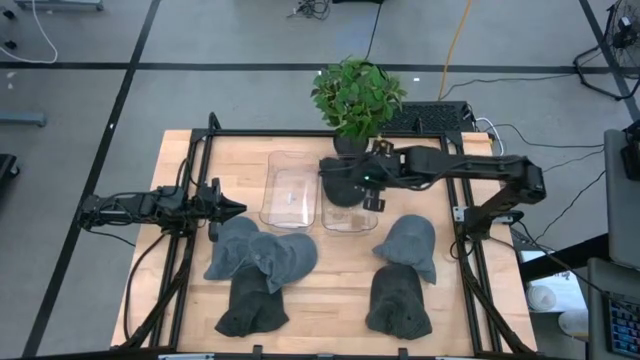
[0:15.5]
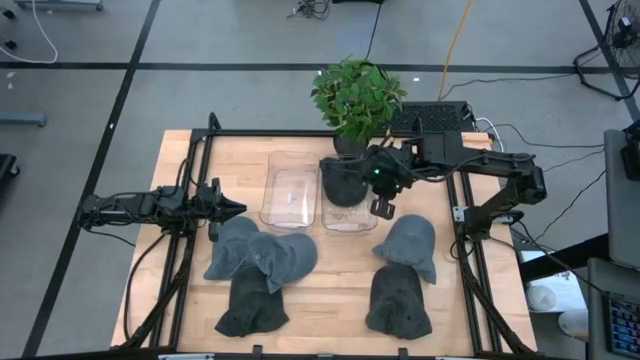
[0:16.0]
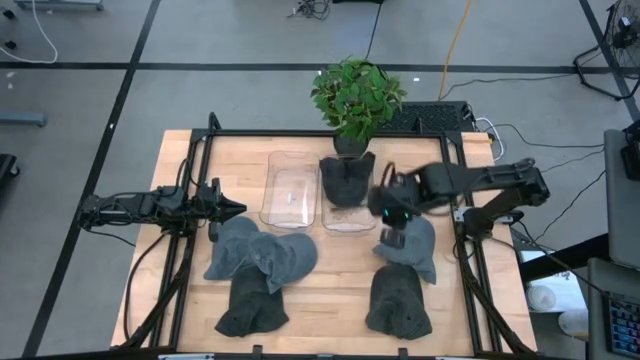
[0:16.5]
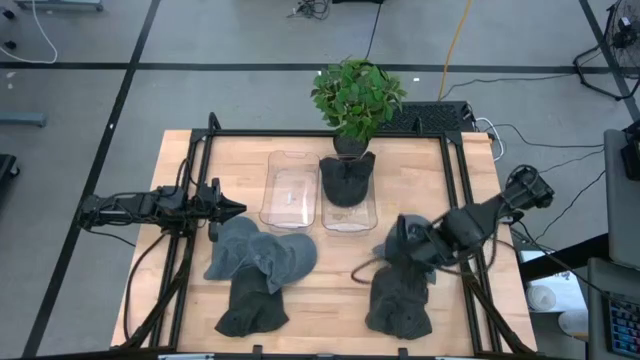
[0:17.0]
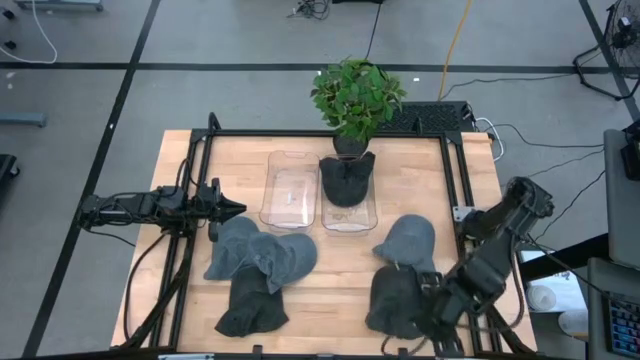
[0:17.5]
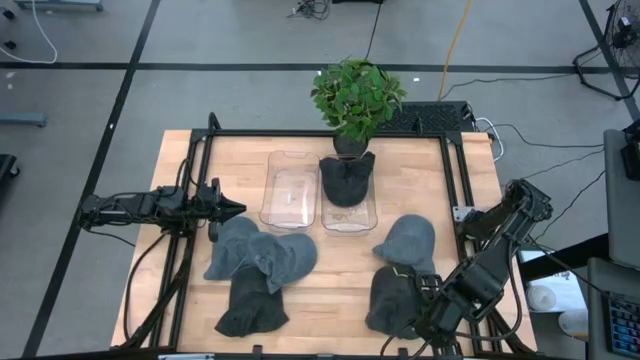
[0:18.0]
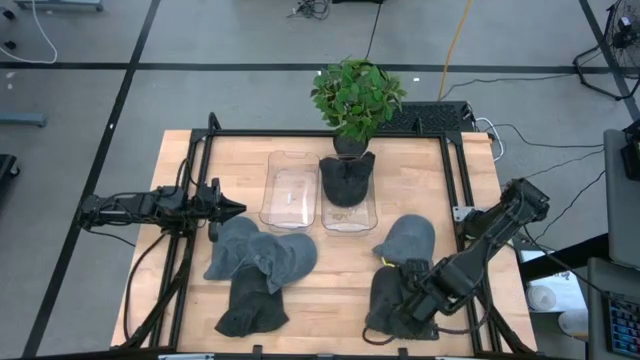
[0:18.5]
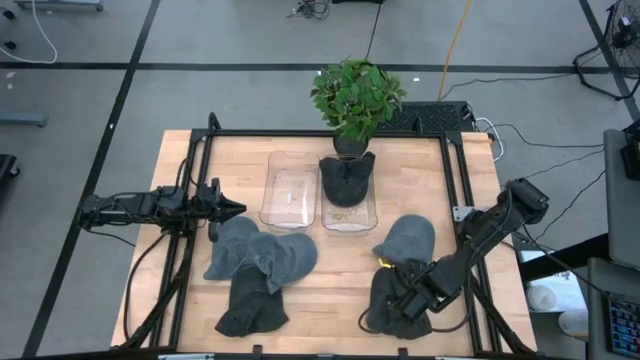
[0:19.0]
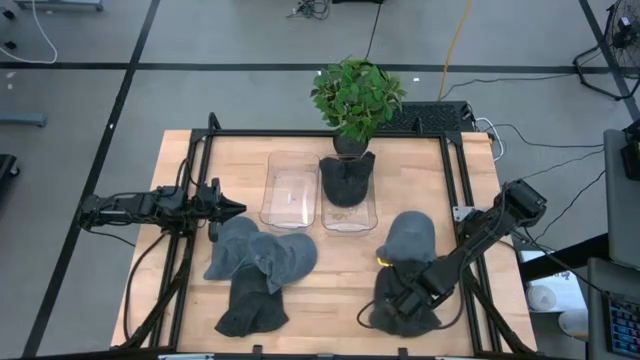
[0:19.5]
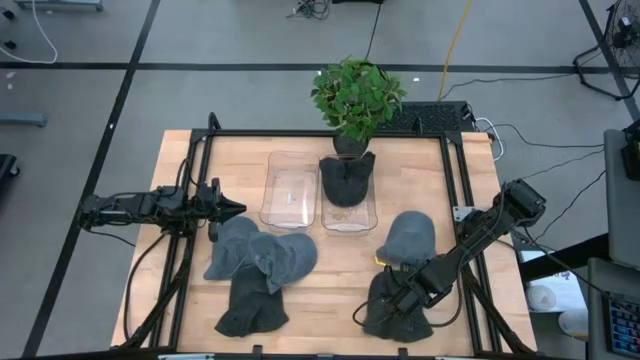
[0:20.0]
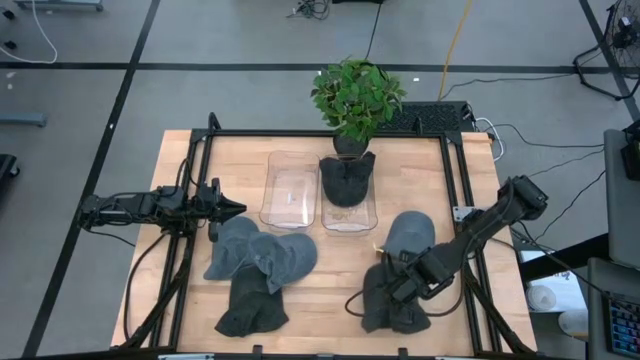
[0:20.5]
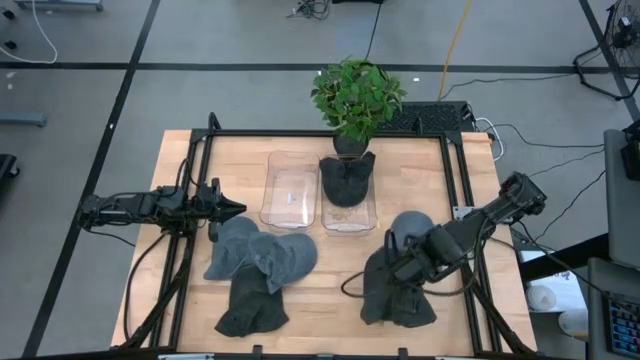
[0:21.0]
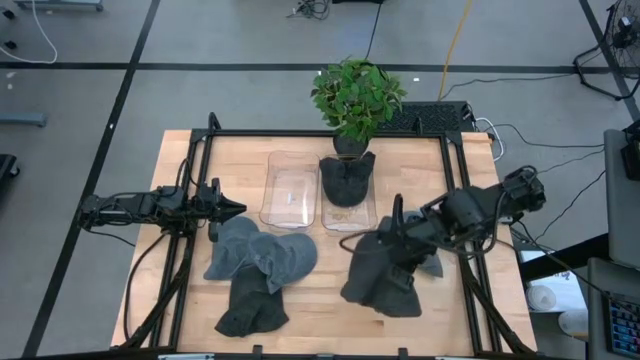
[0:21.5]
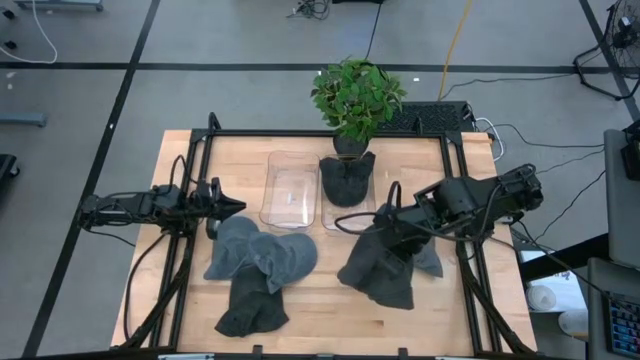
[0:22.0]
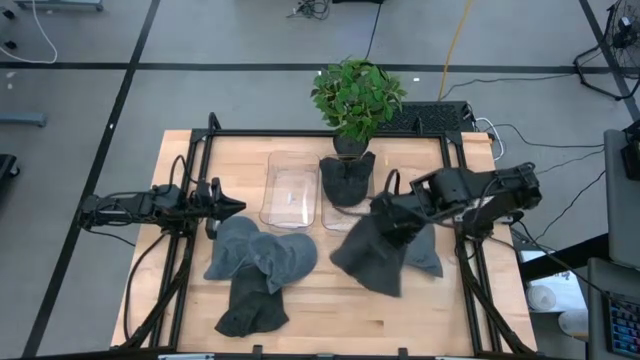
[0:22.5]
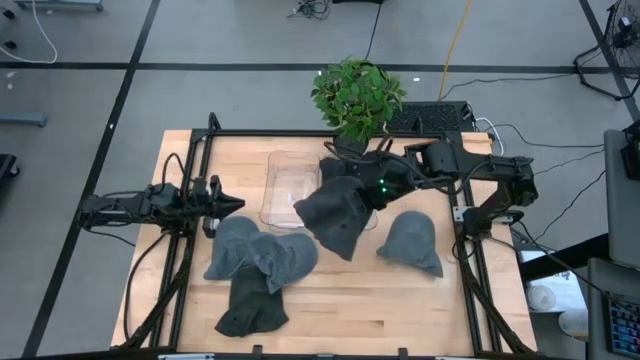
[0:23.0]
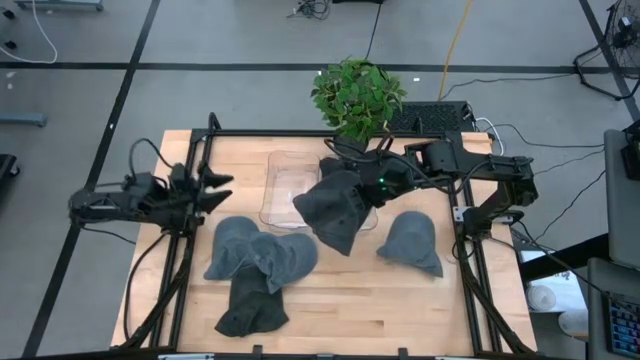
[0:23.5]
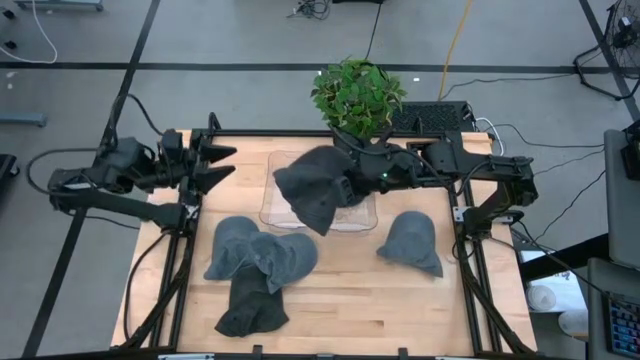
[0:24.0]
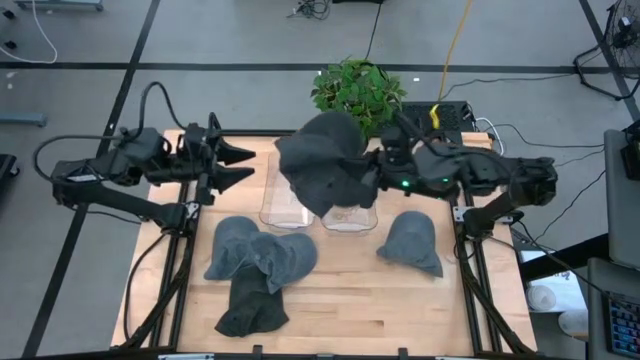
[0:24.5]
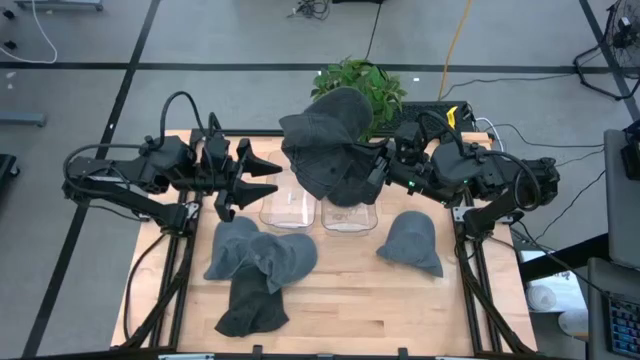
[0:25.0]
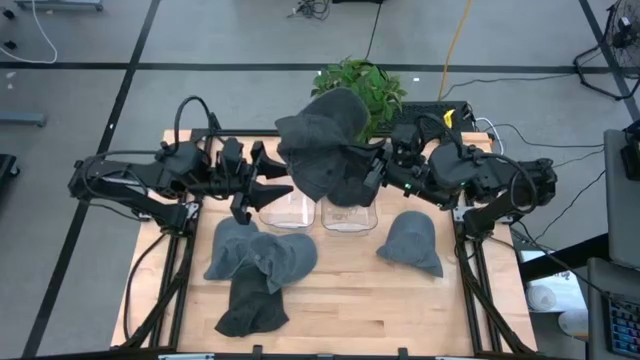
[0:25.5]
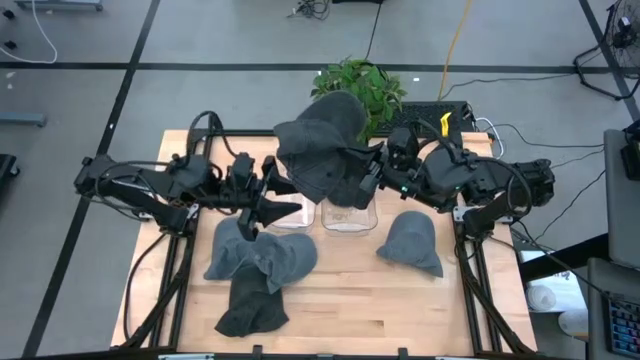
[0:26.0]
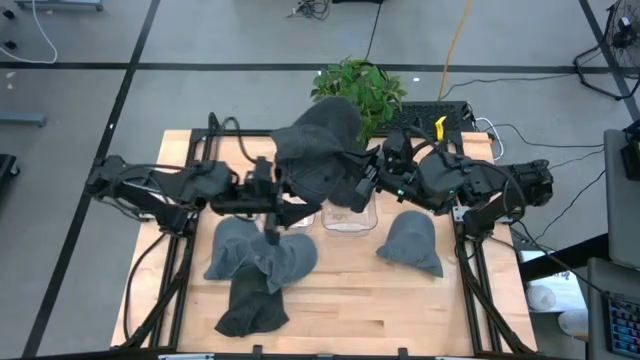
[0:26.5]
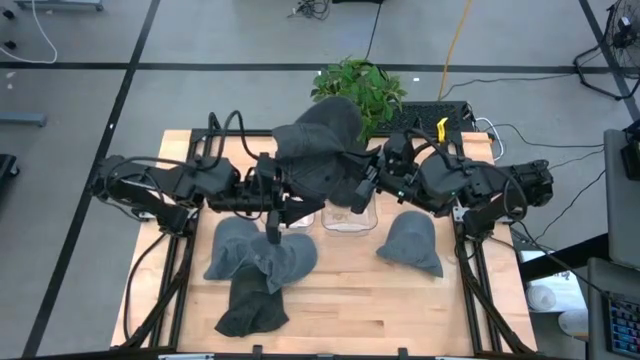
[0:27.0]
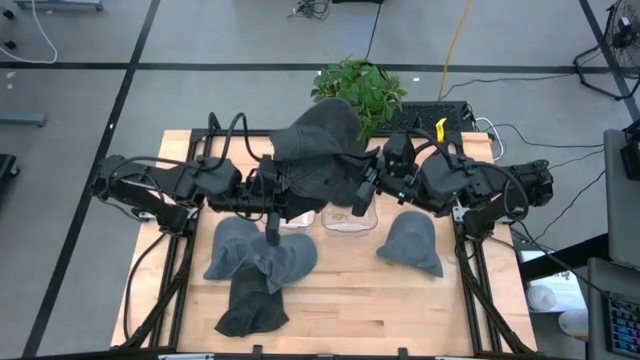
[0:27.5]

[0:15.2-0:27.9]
Task: Pick & Place hat
Put the right black cap into the right transparent bin

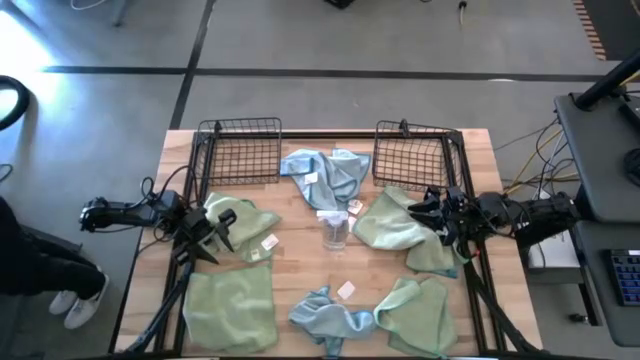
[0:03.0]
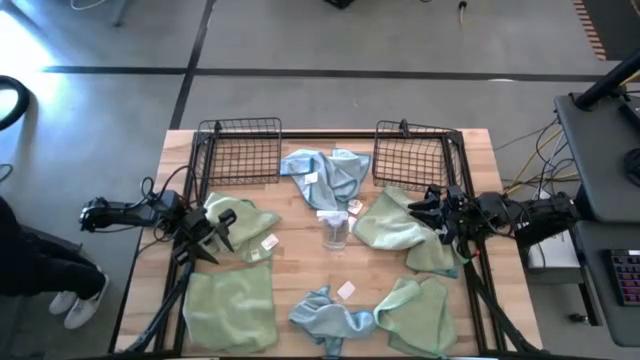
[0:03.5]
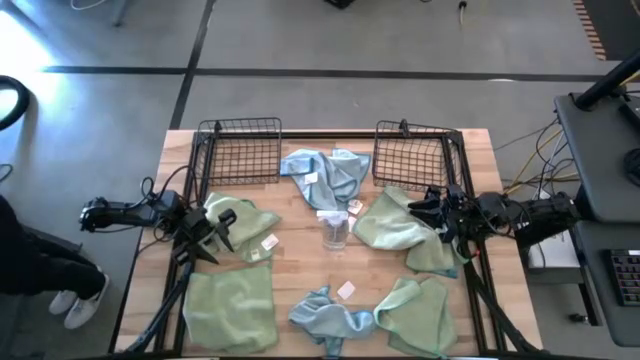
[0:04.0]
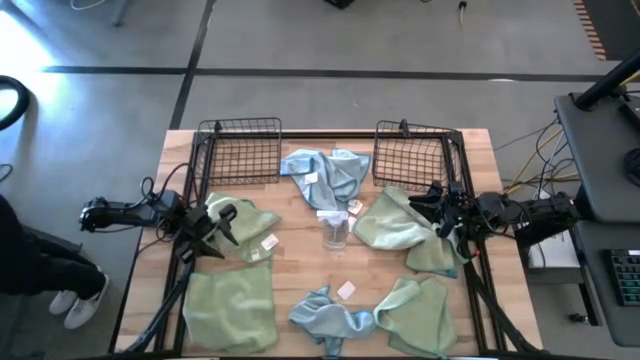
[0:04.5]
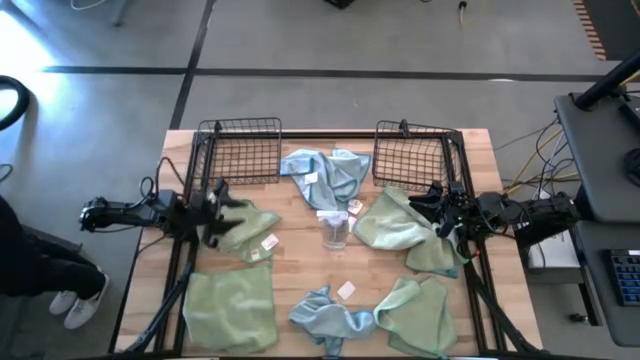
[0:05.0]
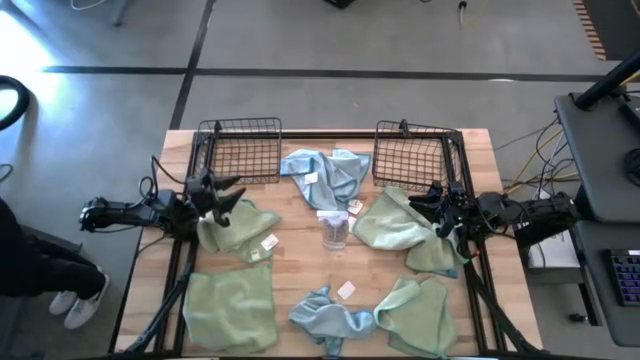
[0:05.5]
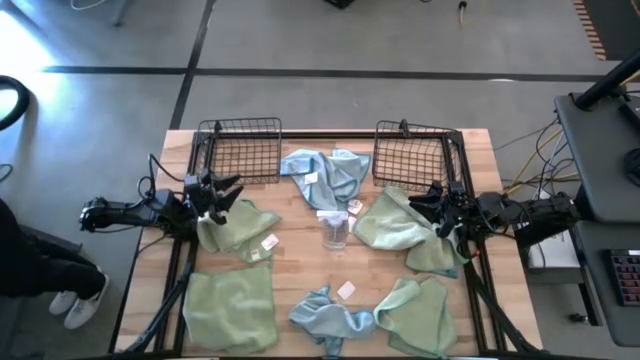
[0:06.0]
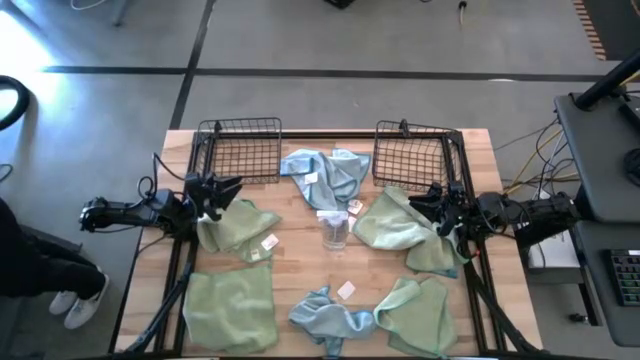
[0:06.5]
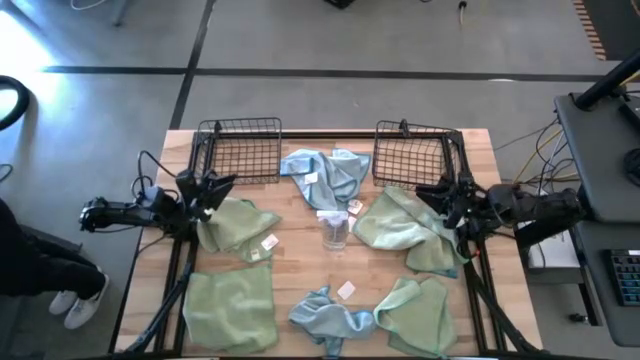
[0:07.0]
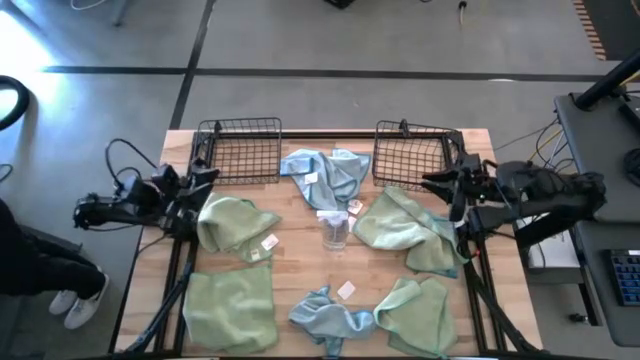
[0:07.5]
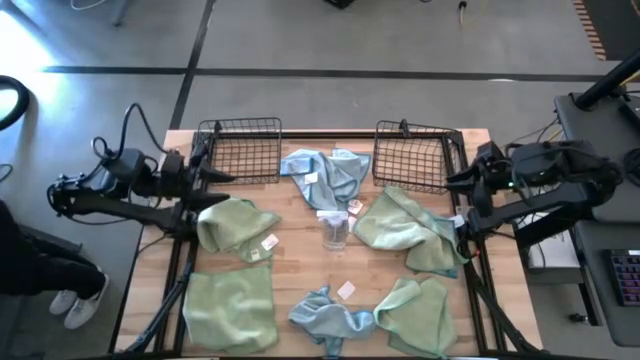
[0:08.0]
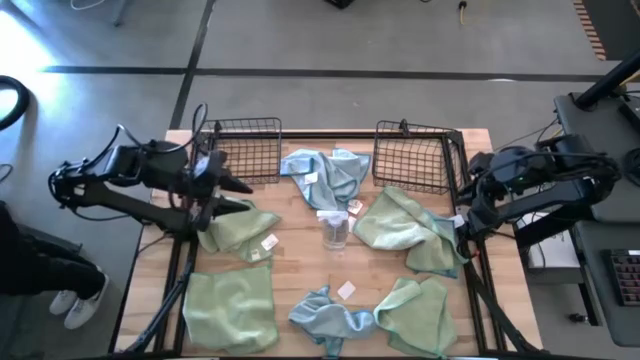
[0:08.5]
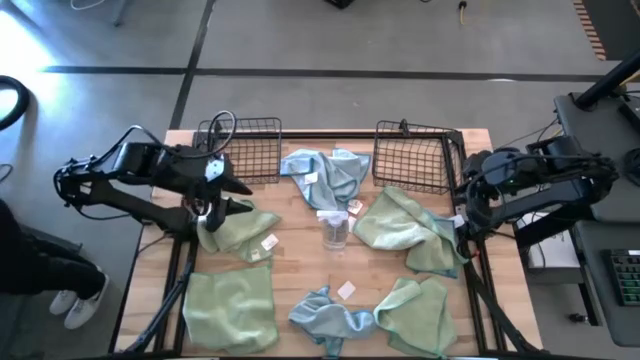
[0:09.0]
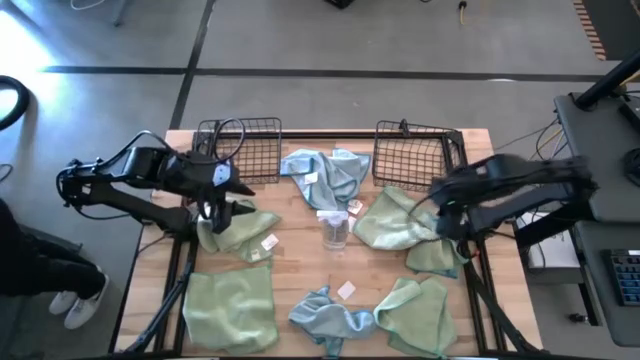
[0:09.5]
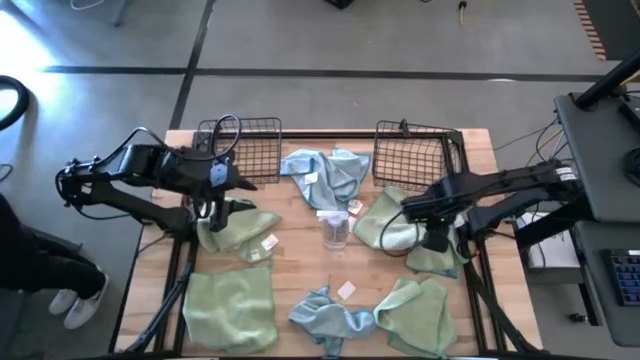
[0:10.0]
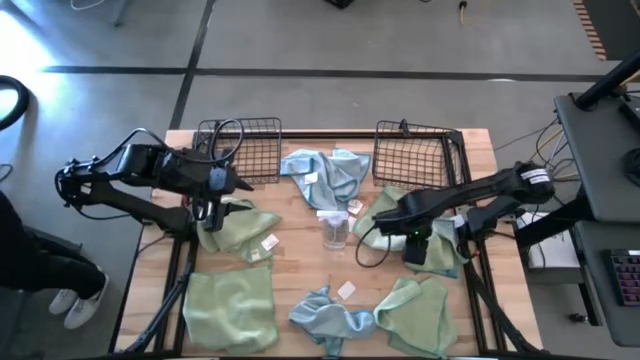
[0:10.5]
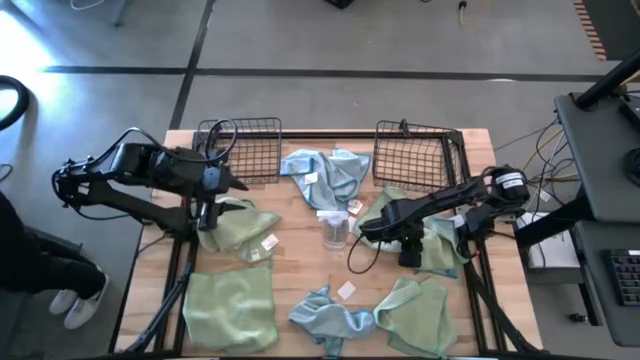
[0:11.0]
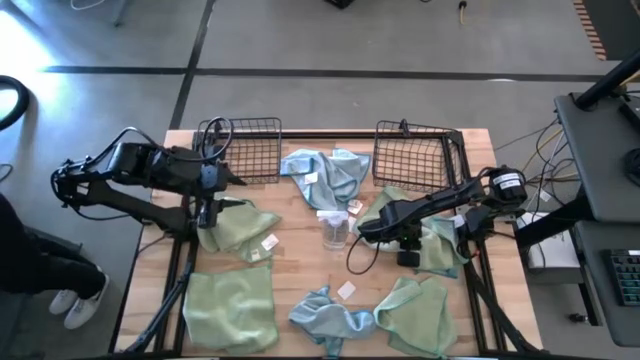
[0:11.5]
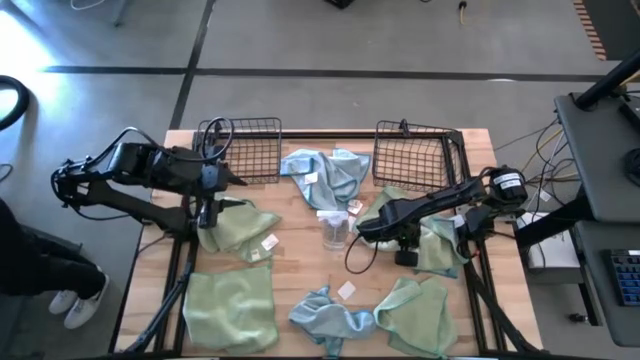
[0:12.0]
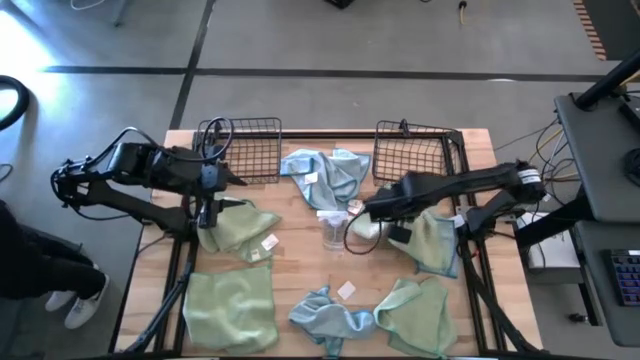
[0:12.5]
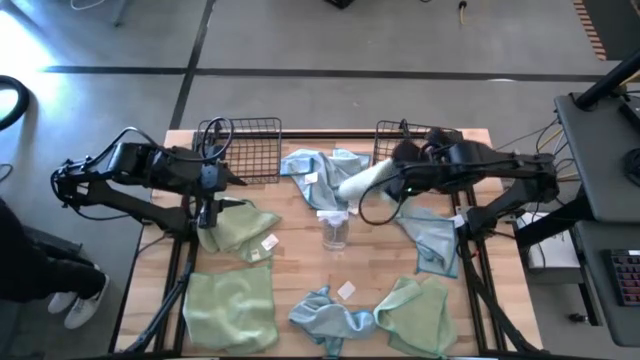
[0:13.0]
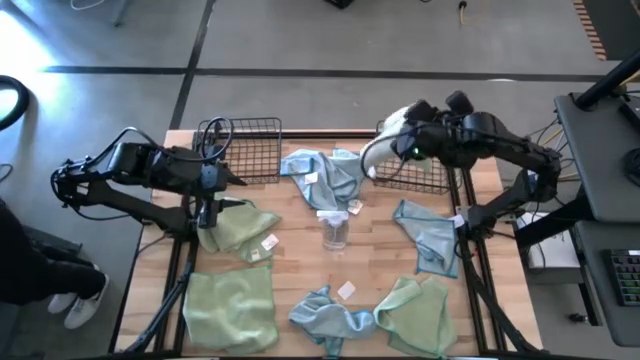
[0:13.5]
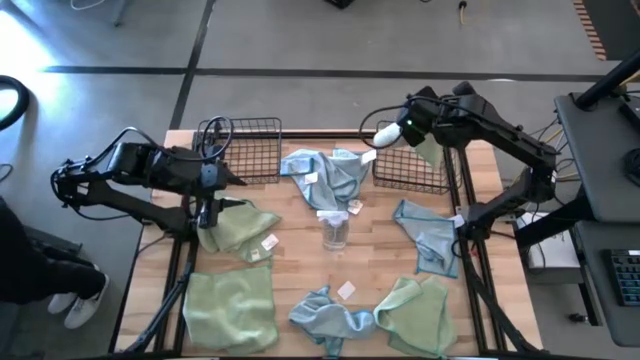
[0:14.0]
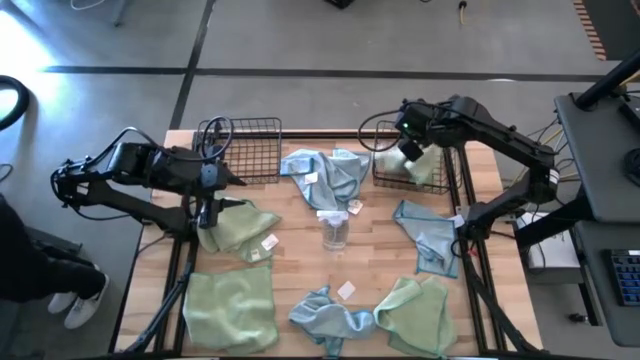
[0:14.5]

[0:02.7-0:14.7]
Task: Sort microfiber towel by color & place in baskets
Put the green towel into the right wire basket
